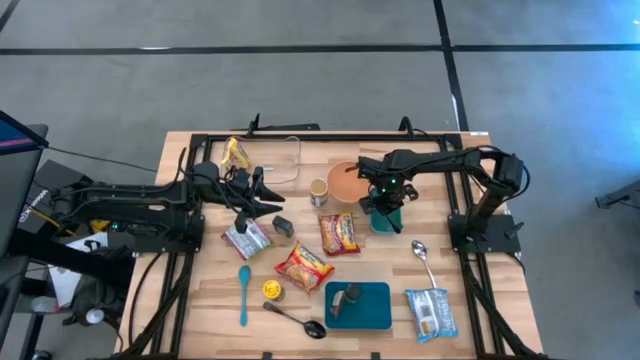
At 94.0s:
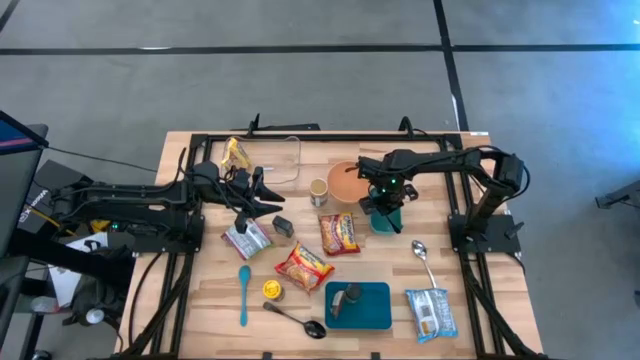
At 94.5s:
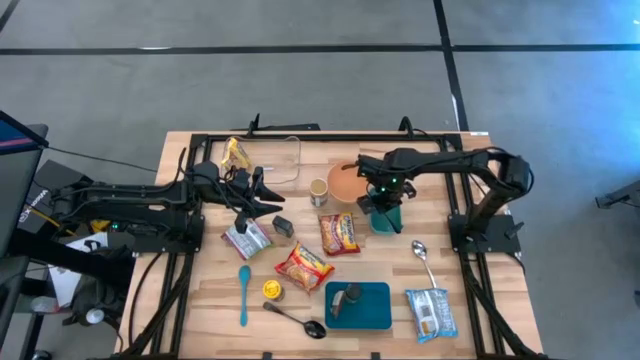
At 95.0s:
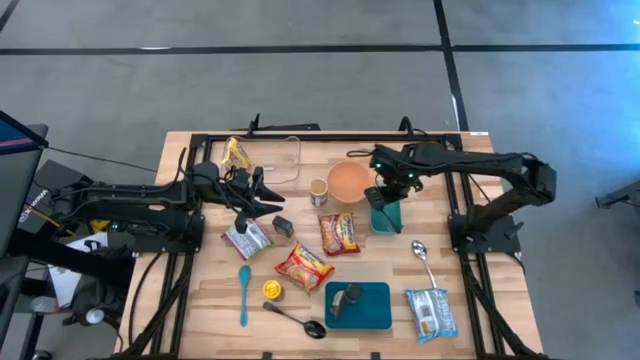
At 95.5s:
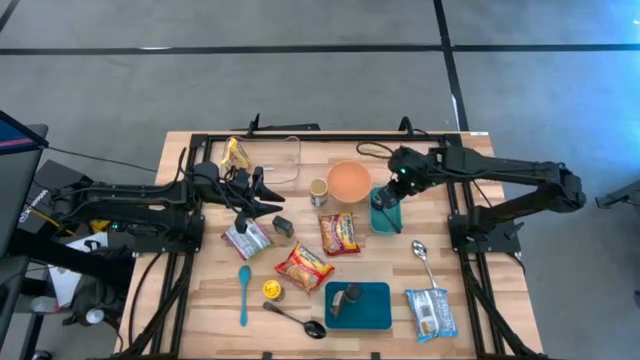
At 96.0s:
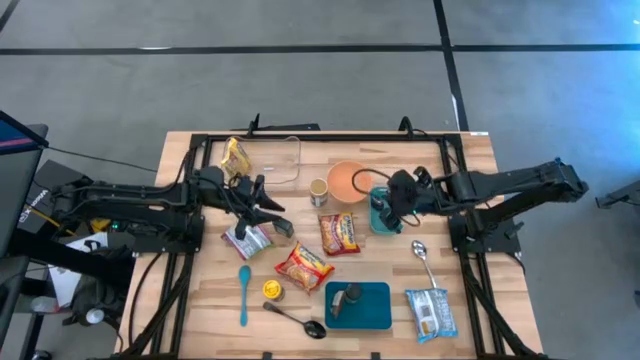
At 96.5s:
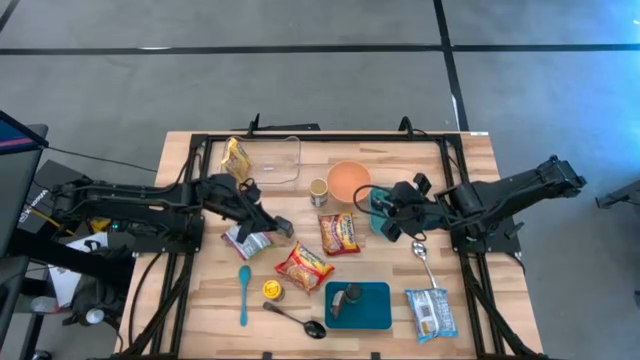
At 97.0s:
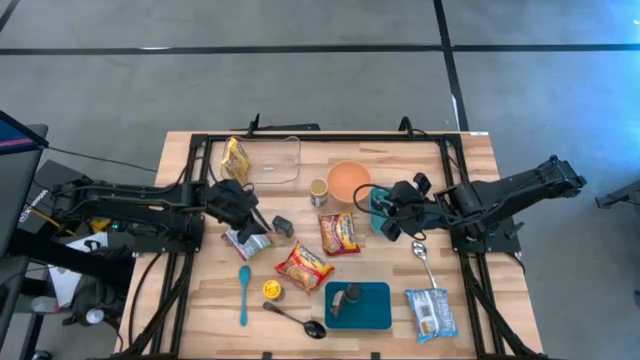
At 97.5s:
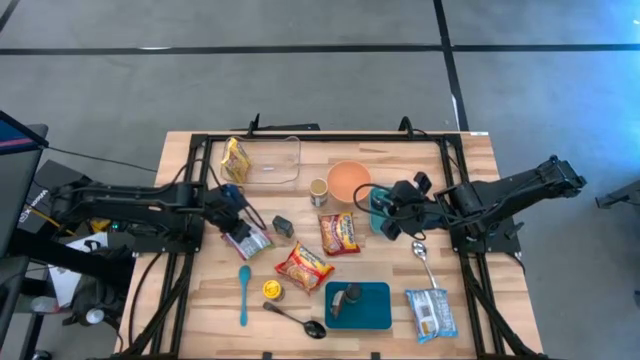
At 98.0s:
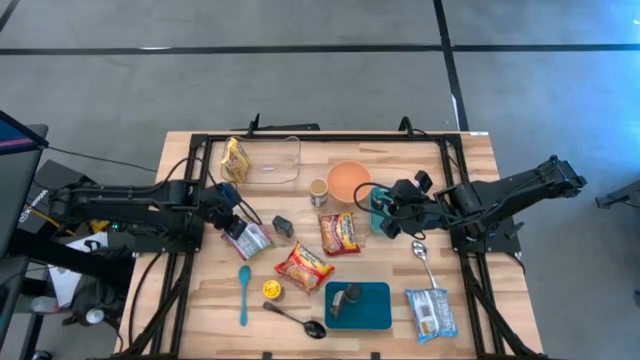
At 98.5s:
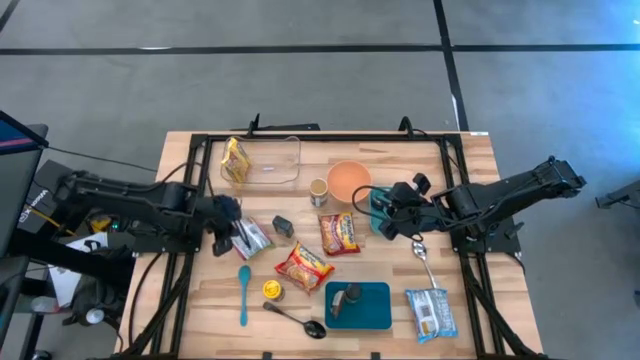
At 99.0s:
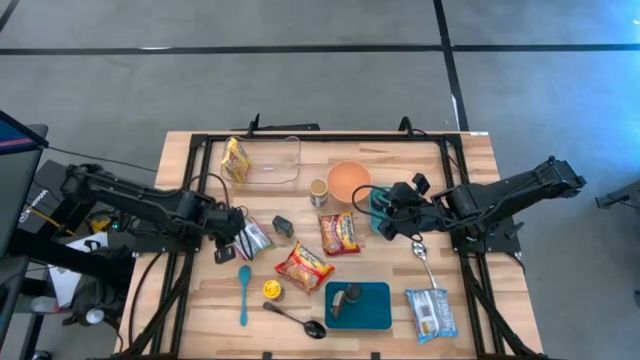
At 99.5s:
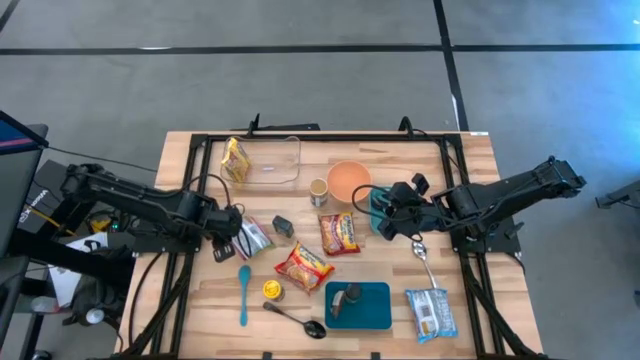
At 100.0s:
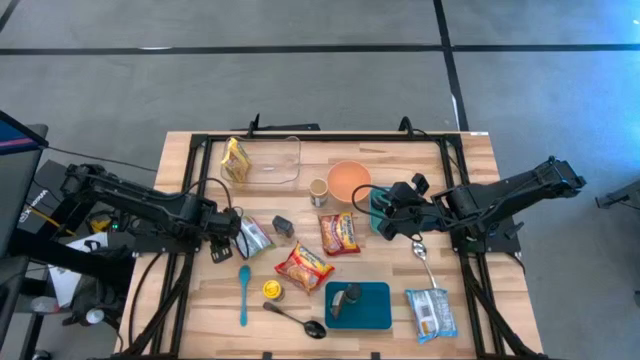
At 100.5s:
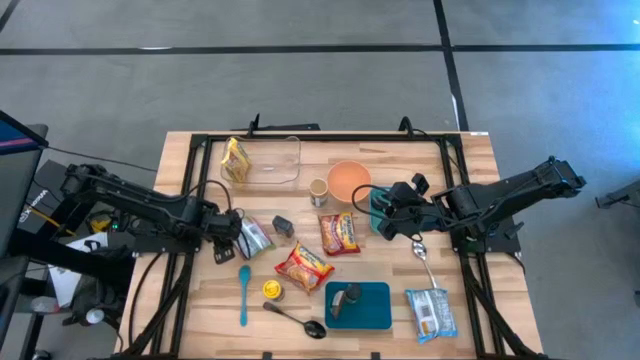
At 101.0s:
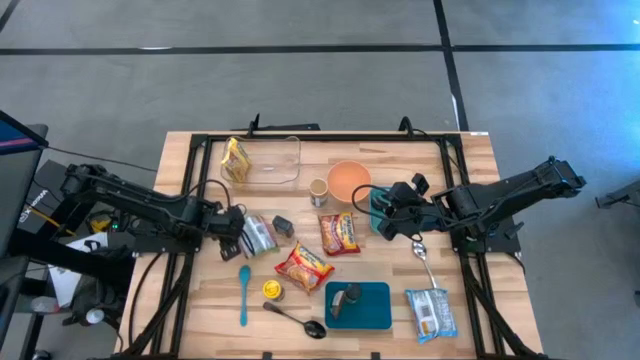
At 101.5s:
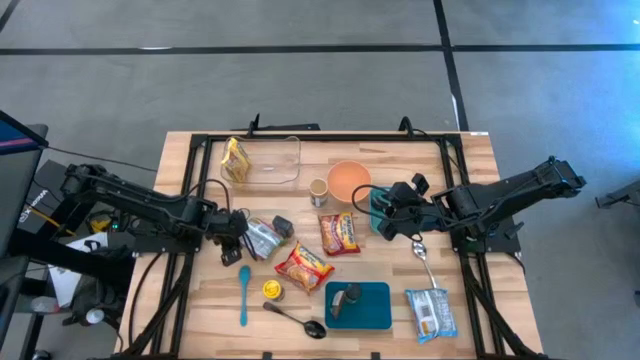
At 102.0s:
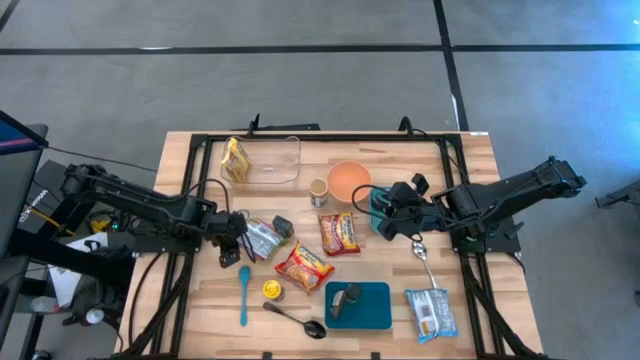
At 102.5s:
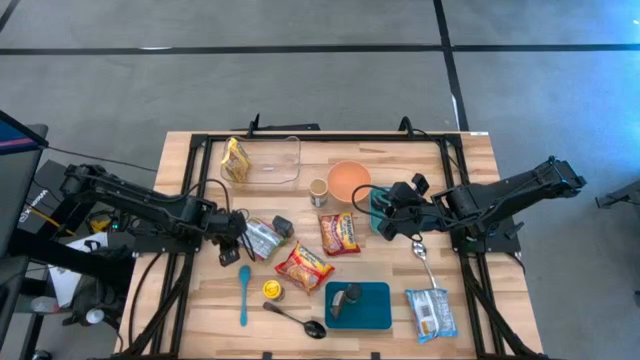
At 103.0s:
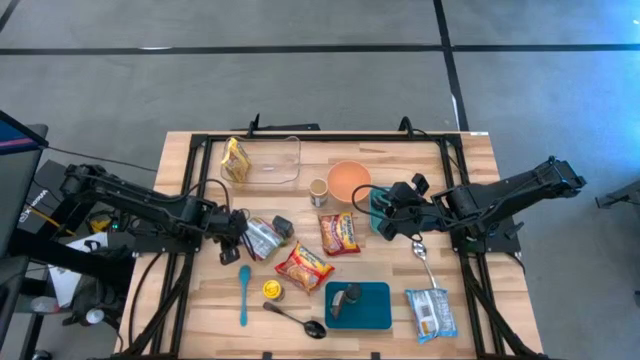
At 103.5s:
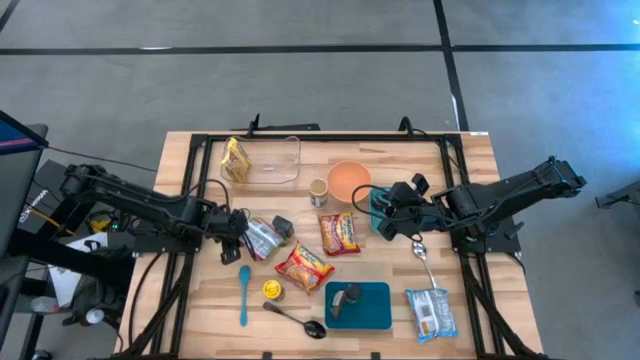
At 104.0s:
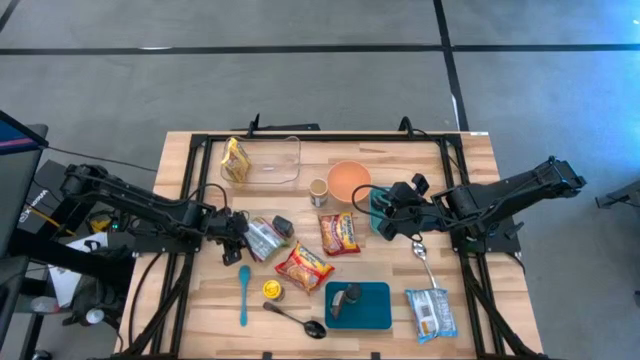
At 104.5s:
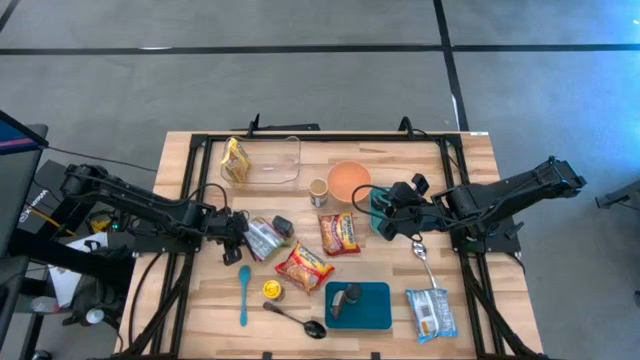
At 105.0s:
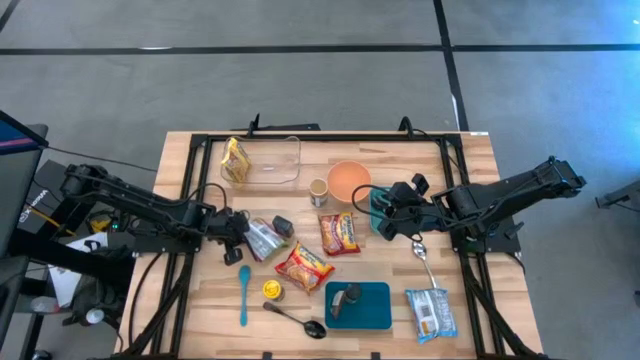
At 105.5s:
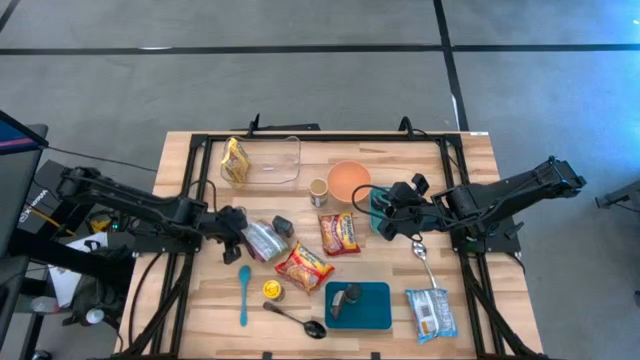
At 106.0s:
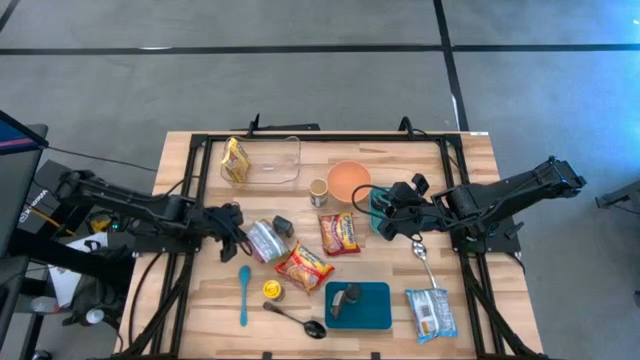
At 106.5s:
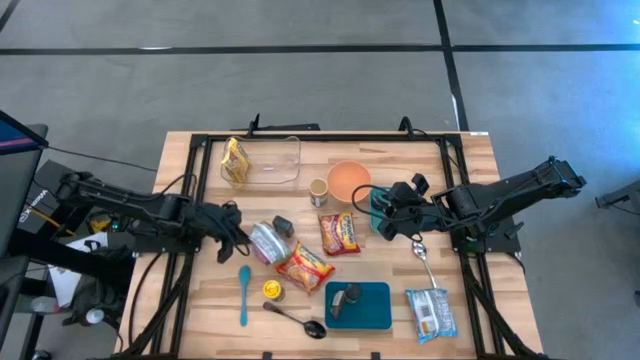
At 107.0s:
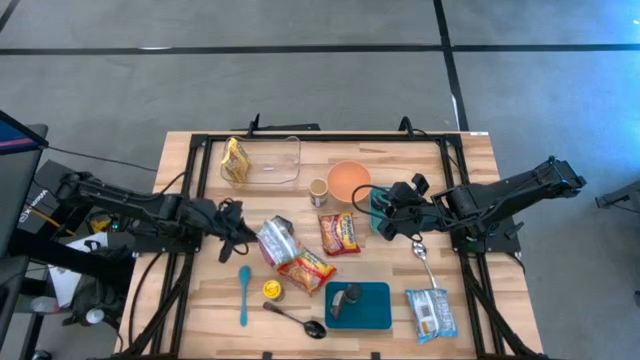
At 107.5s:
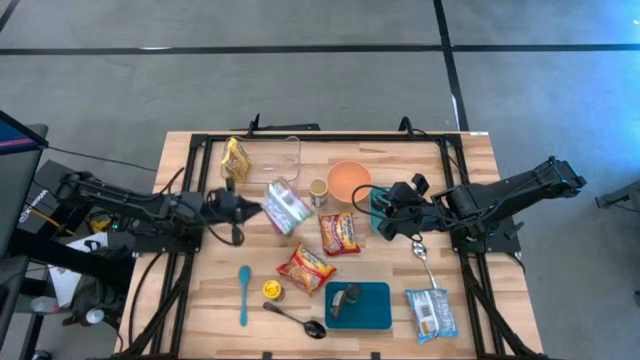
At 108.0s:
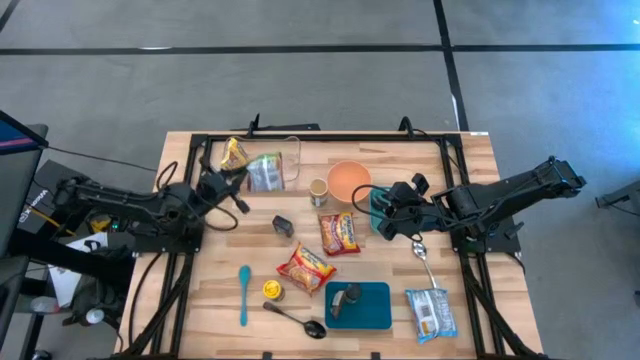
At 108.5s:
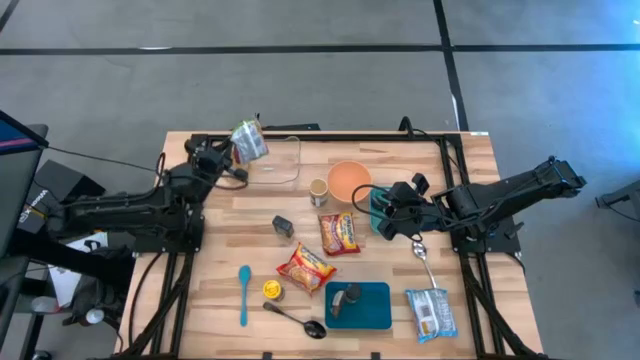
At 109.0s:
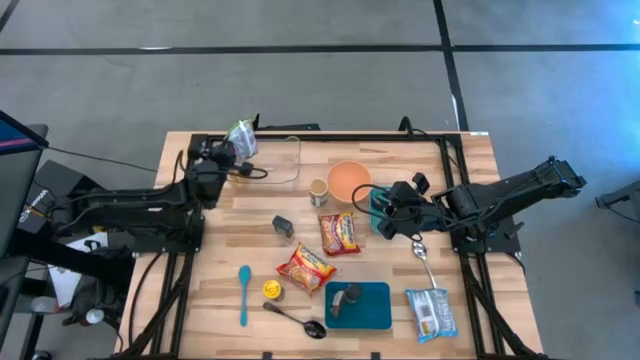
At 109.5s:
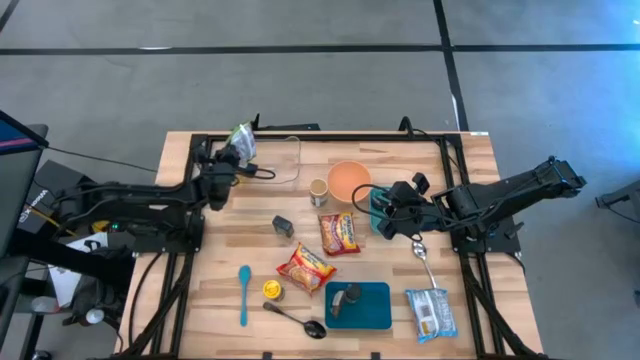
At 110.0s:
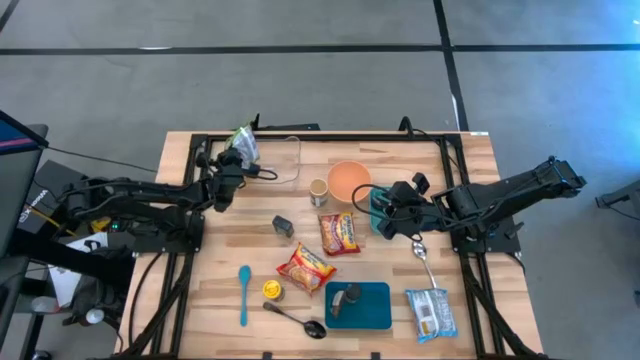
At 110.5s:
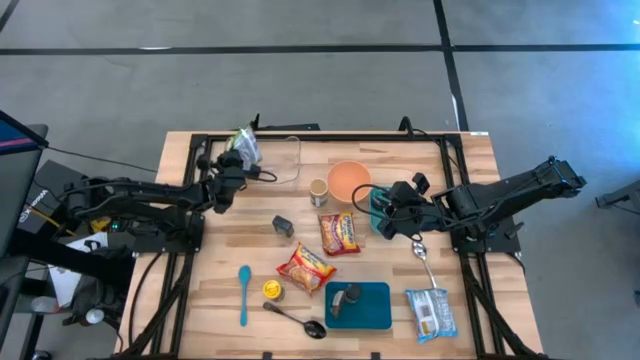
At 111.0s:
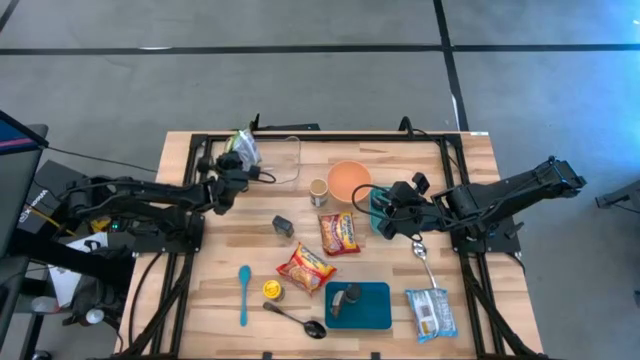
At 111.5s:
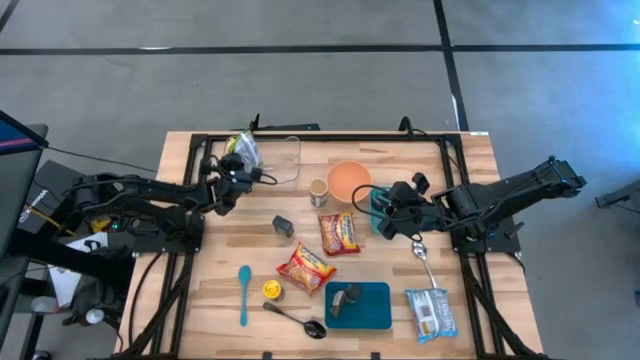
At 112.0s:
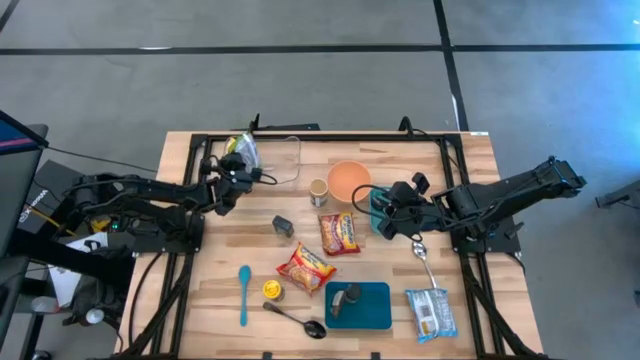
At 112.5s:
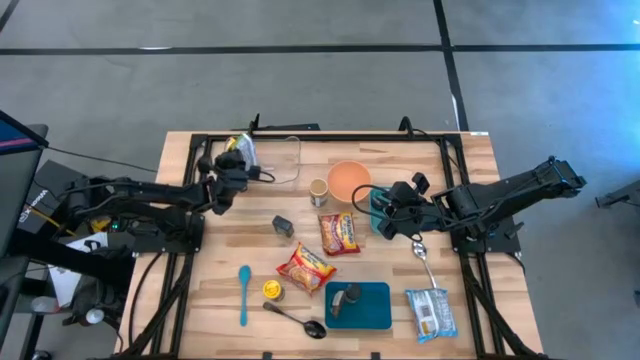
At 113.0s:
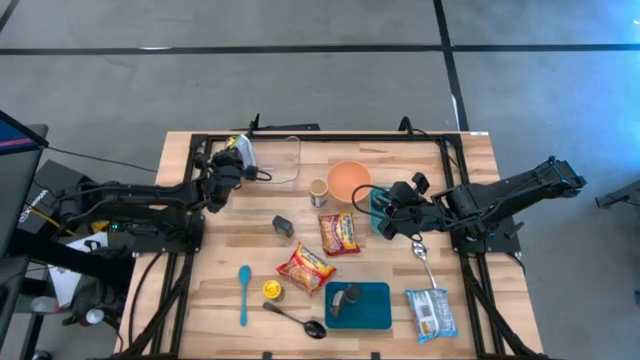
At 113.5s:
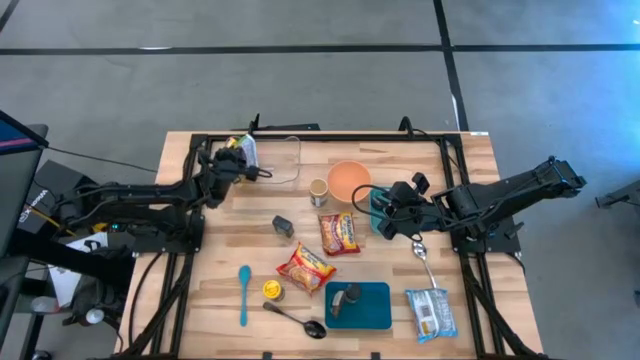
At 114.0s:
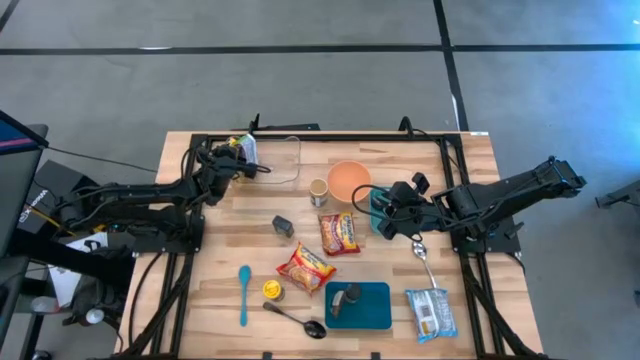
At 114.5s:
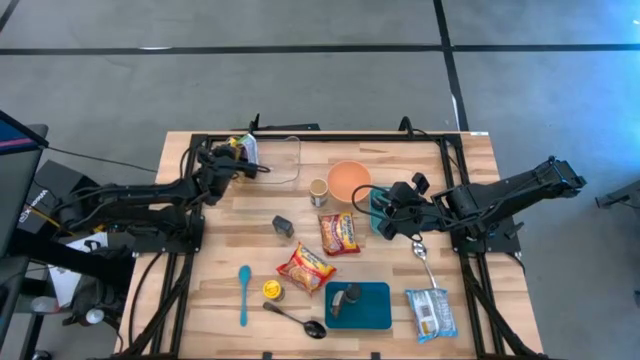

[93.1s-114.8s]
Task: Pick & Place Food Item
Put the green noodle pack into the transparent bin

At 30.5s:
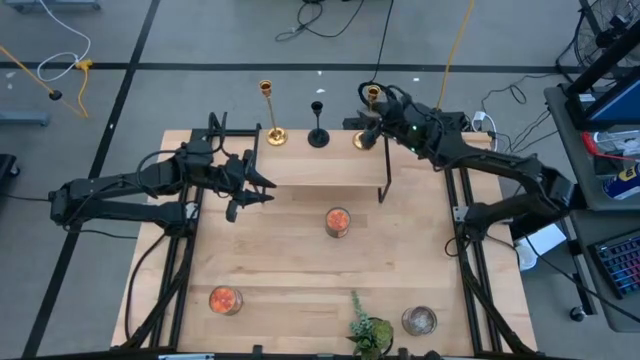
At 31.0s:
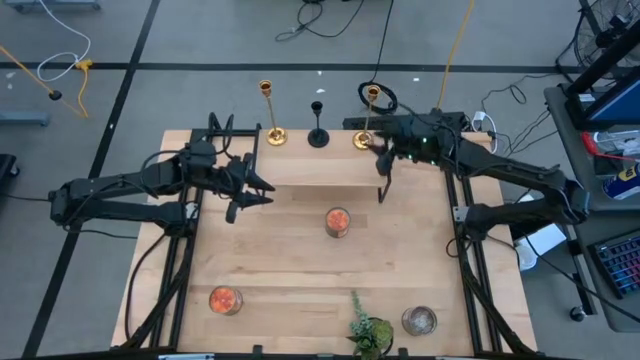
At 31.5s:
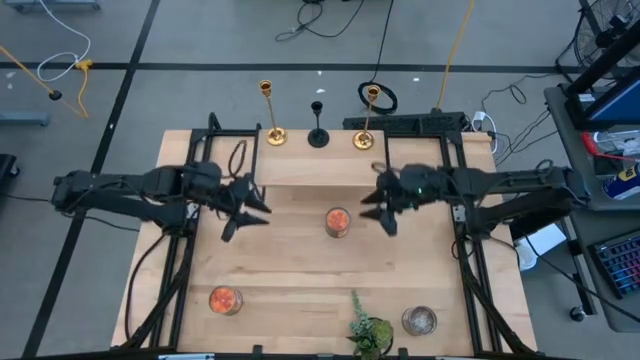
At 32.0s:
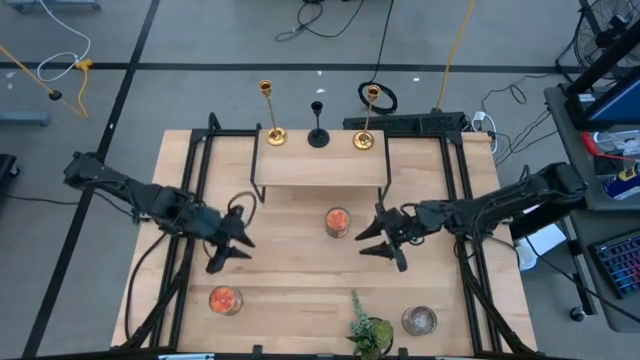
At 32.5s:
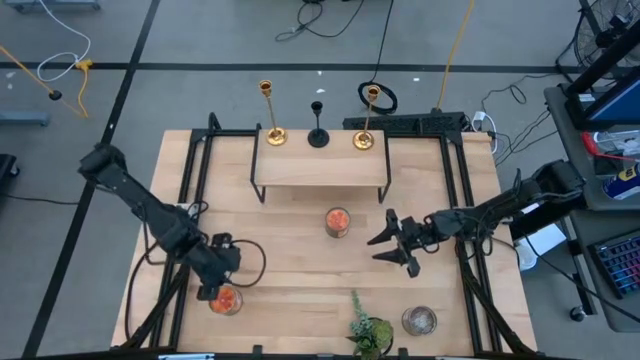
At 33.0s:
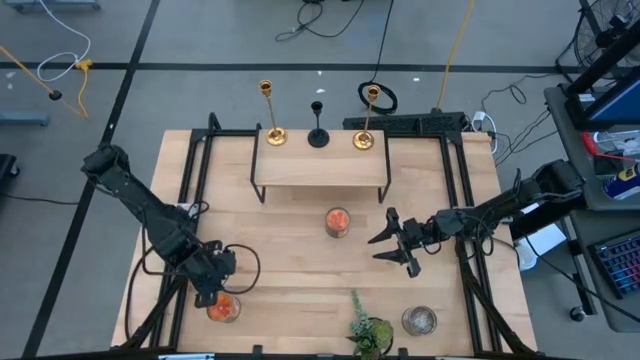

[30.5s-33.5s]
Task: Pick & Place candle stick holders
Put the bottom orange scented candle on the shelf
